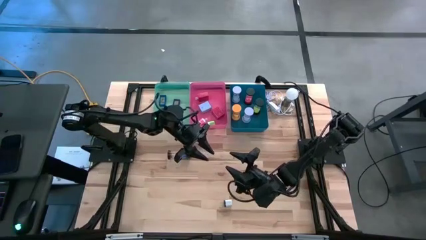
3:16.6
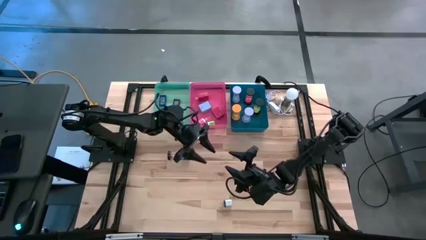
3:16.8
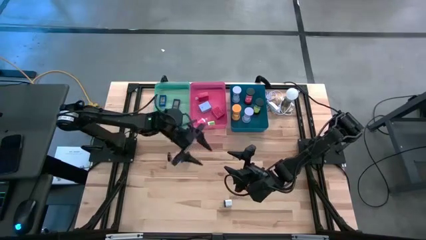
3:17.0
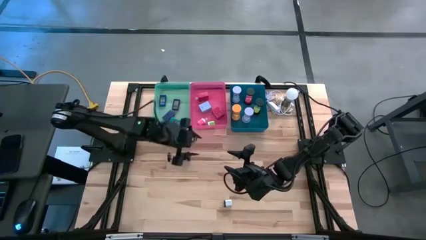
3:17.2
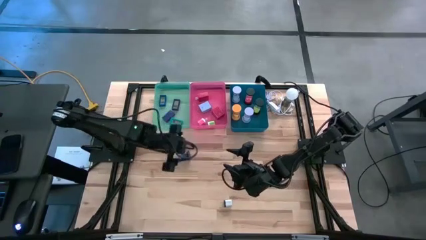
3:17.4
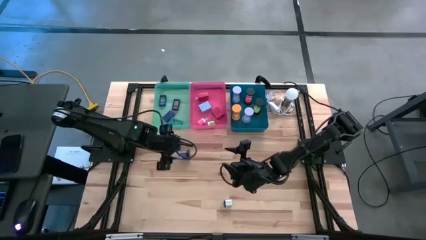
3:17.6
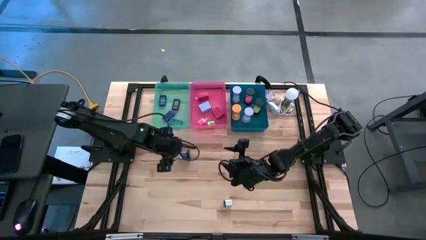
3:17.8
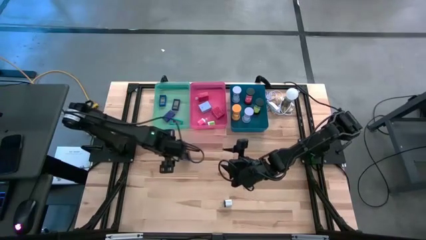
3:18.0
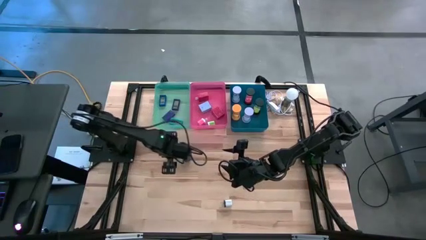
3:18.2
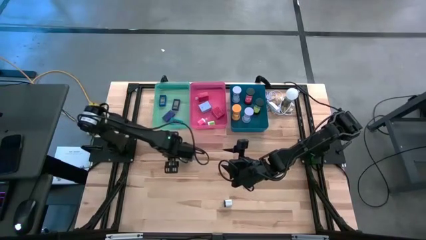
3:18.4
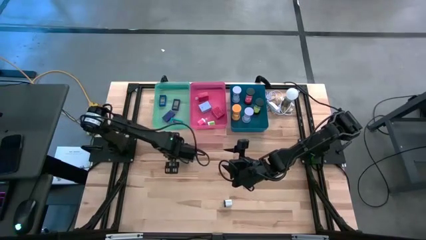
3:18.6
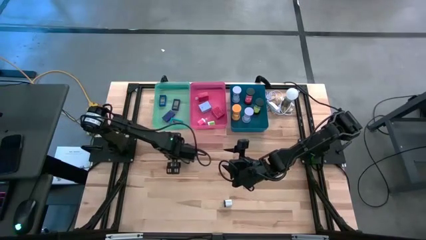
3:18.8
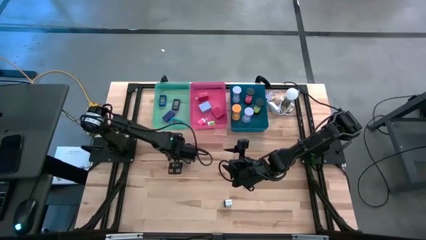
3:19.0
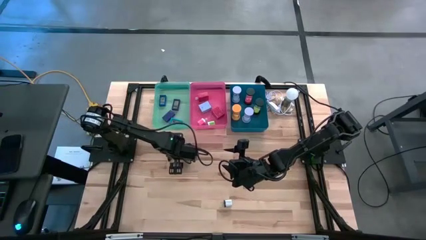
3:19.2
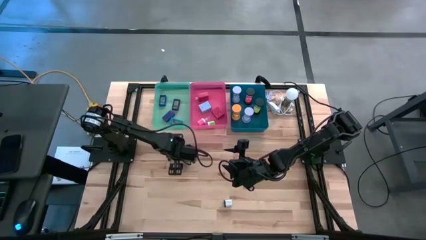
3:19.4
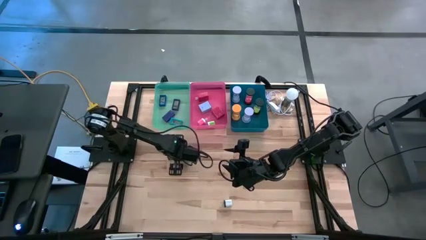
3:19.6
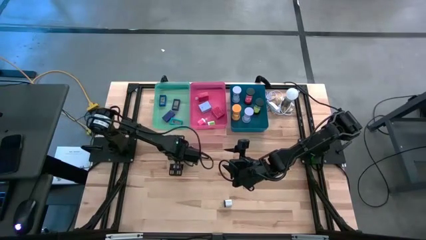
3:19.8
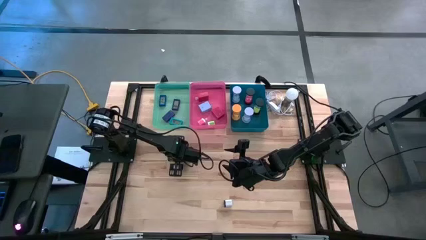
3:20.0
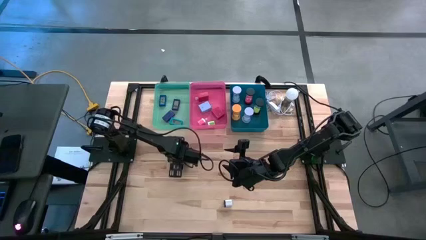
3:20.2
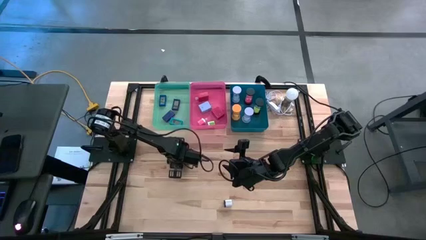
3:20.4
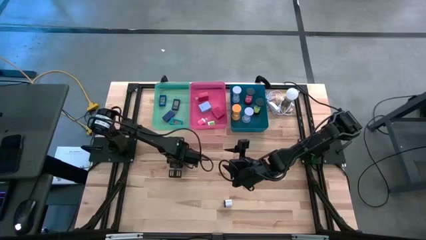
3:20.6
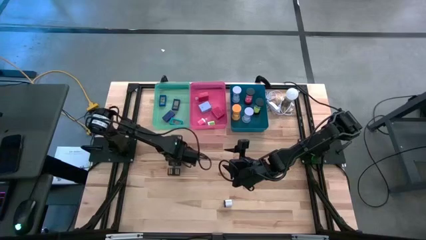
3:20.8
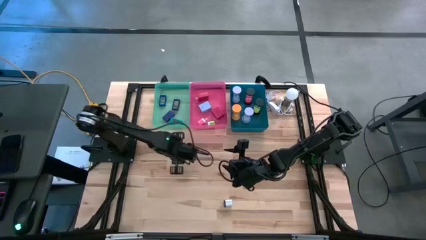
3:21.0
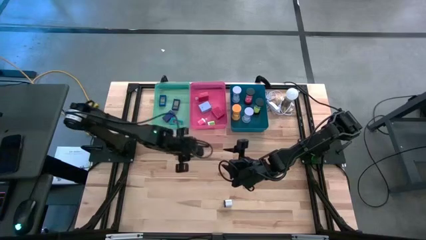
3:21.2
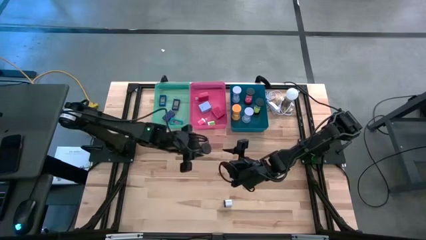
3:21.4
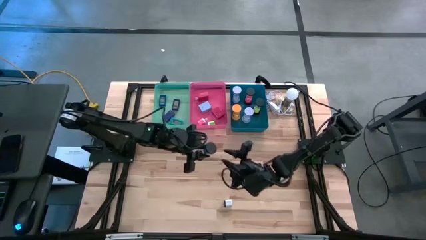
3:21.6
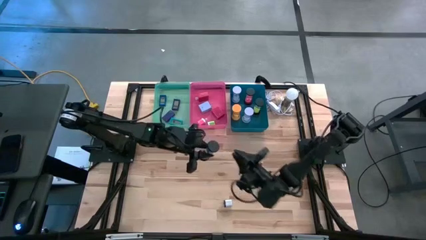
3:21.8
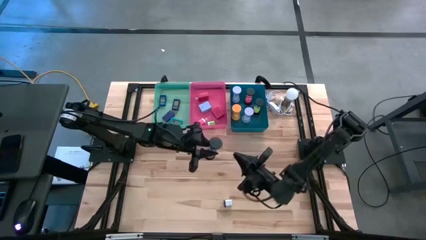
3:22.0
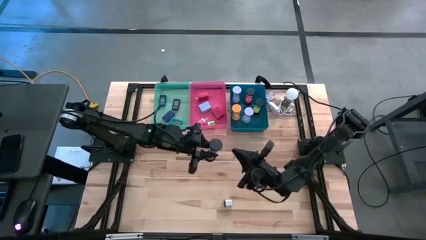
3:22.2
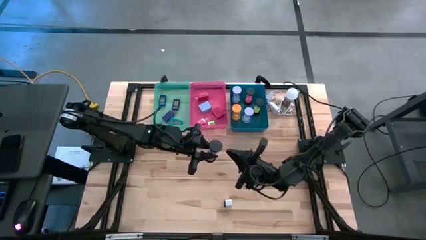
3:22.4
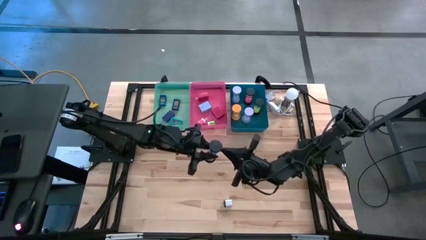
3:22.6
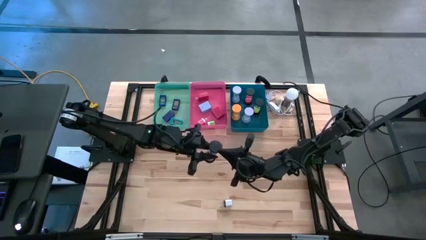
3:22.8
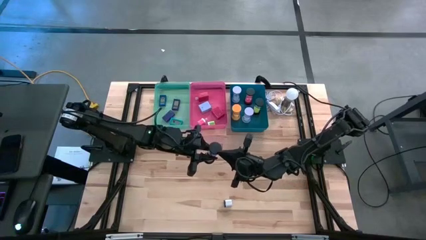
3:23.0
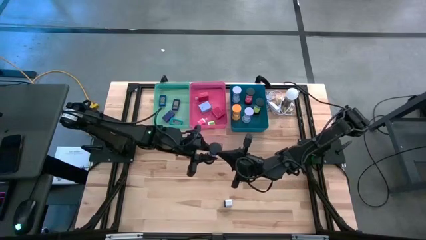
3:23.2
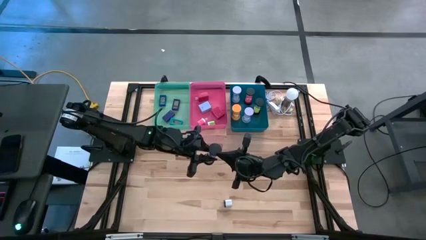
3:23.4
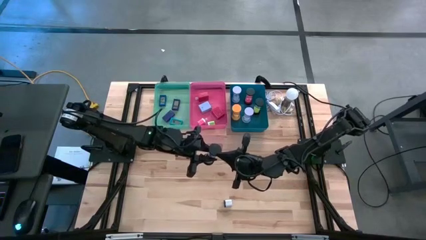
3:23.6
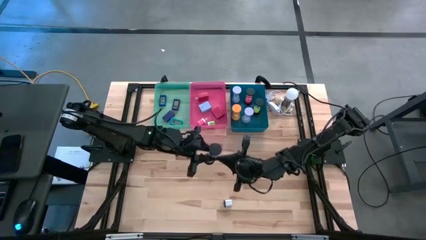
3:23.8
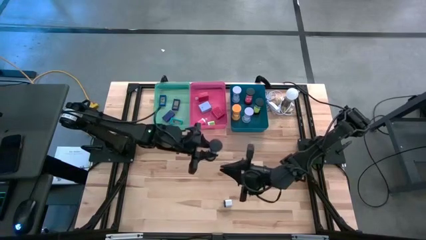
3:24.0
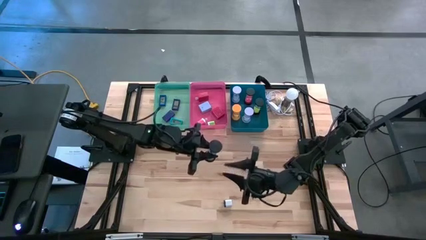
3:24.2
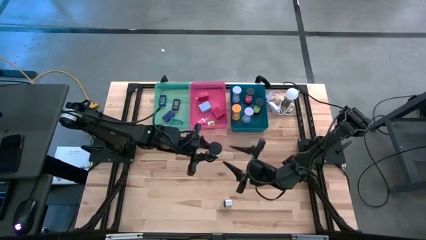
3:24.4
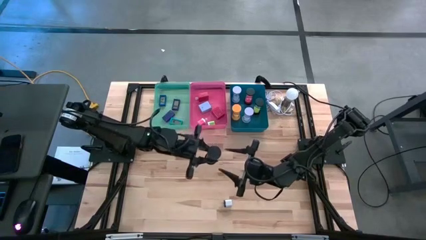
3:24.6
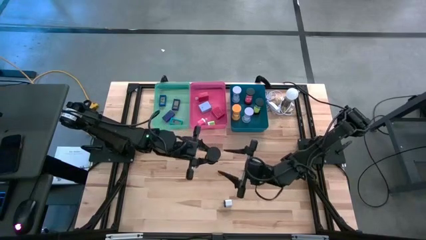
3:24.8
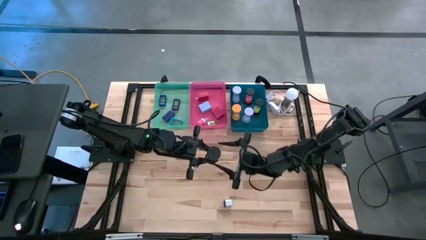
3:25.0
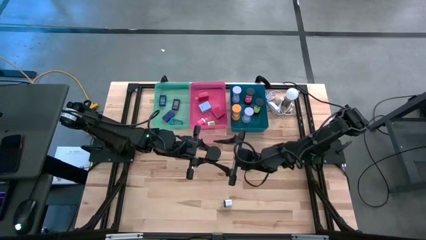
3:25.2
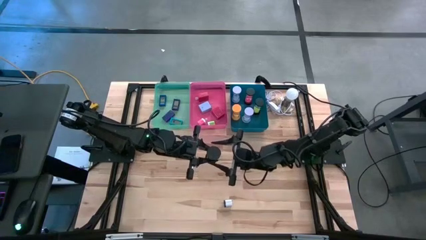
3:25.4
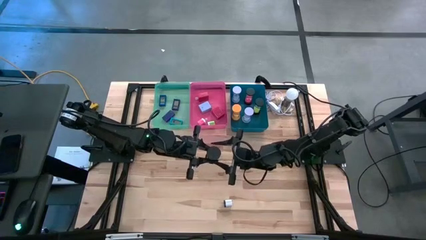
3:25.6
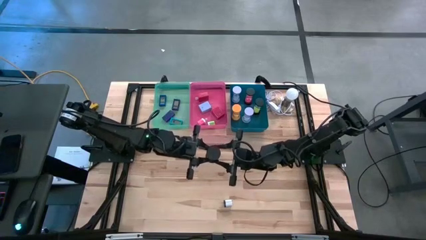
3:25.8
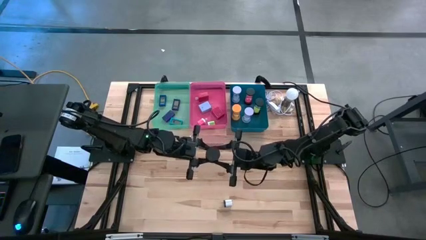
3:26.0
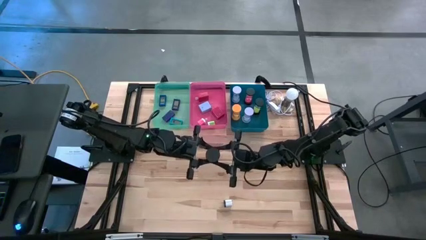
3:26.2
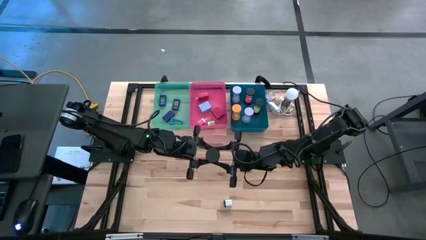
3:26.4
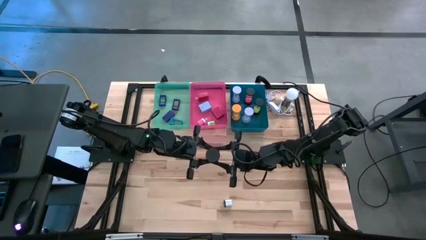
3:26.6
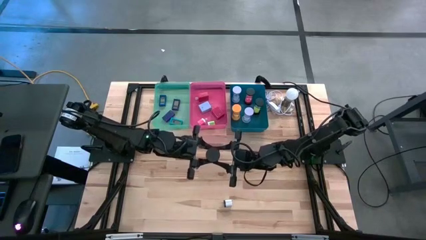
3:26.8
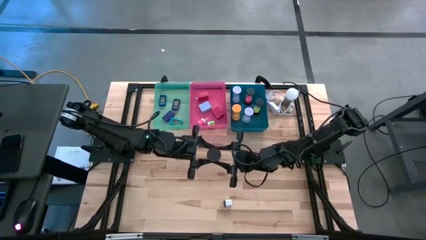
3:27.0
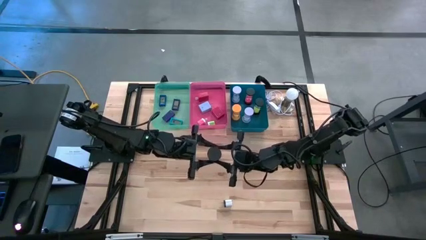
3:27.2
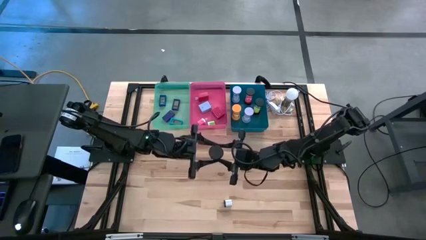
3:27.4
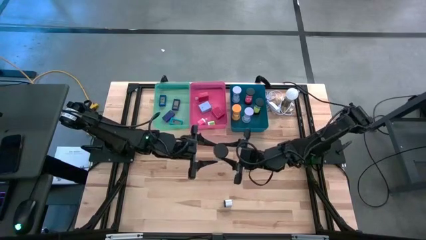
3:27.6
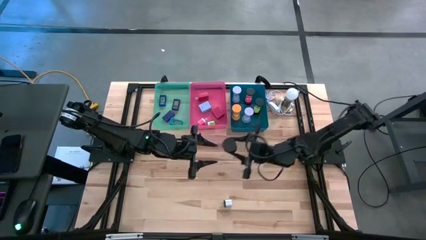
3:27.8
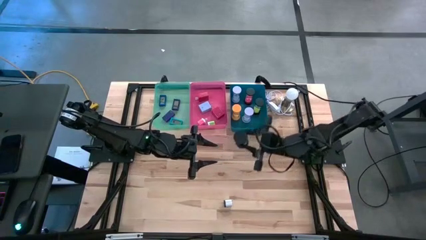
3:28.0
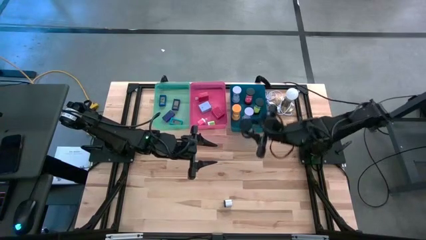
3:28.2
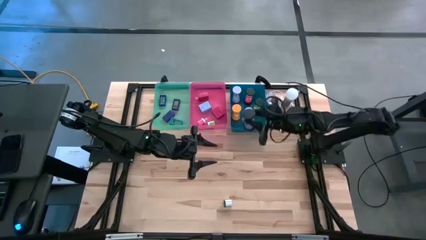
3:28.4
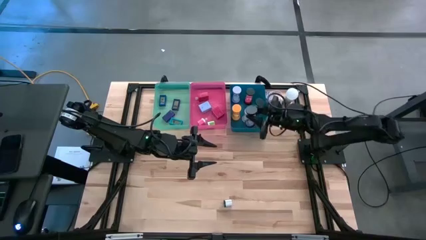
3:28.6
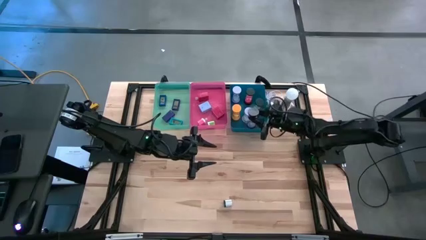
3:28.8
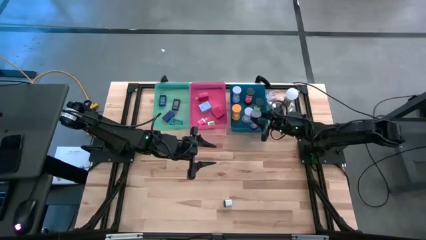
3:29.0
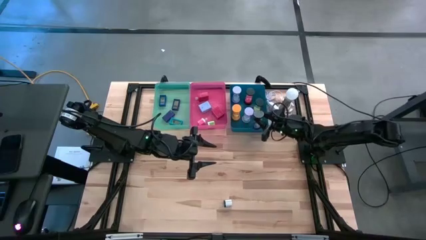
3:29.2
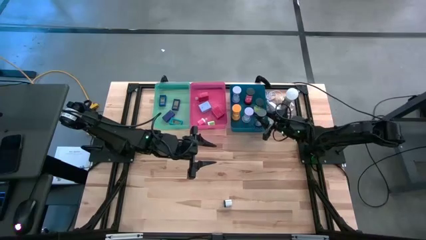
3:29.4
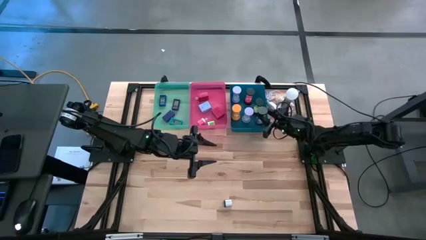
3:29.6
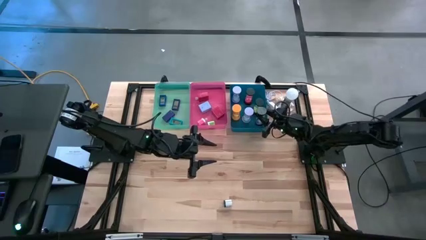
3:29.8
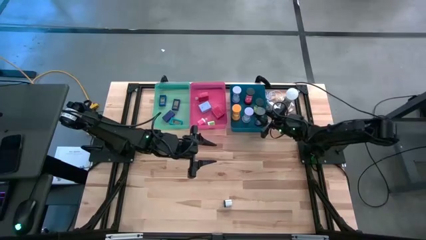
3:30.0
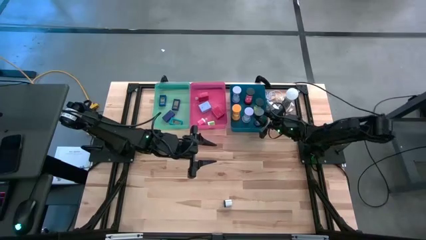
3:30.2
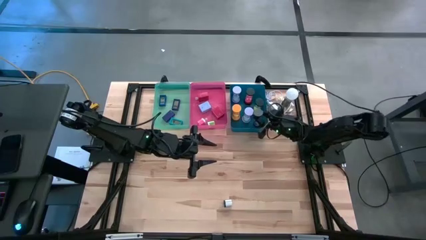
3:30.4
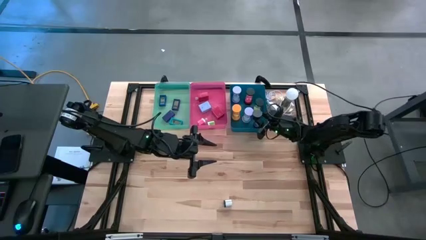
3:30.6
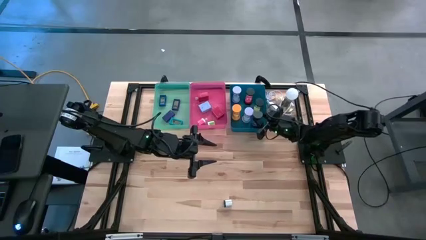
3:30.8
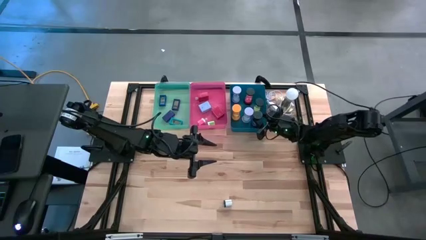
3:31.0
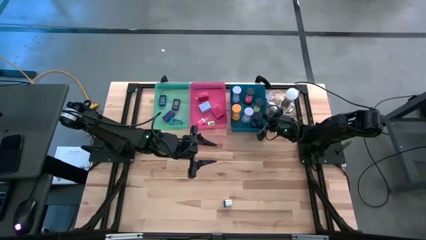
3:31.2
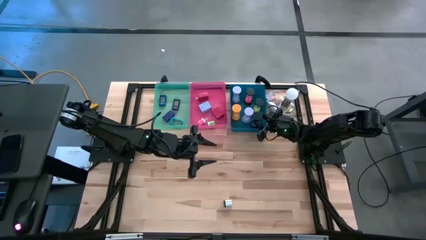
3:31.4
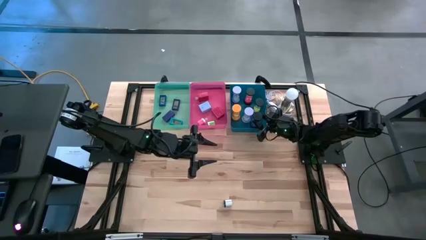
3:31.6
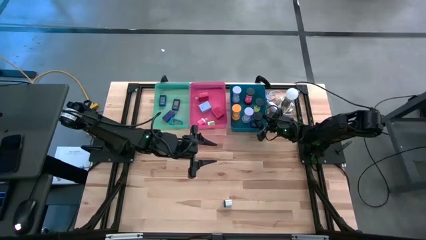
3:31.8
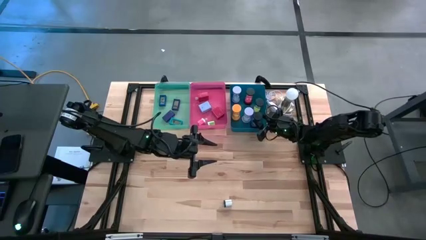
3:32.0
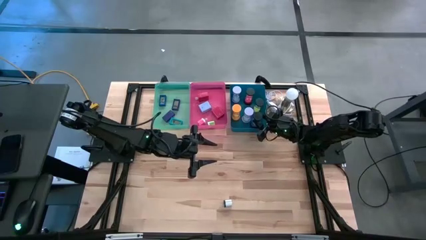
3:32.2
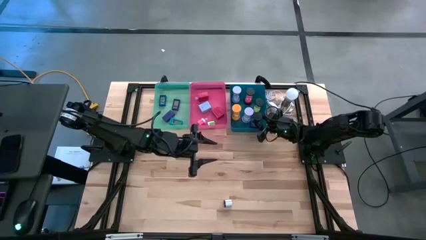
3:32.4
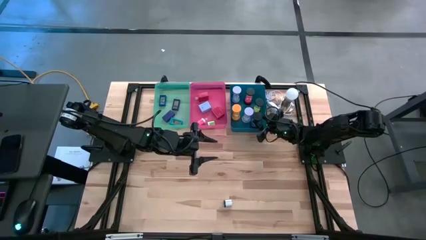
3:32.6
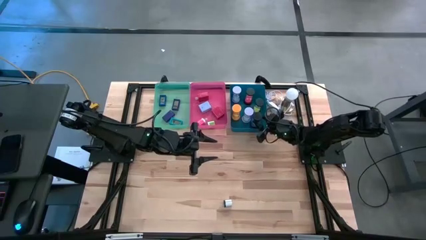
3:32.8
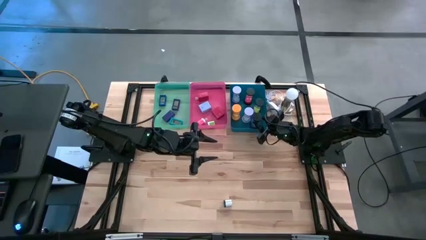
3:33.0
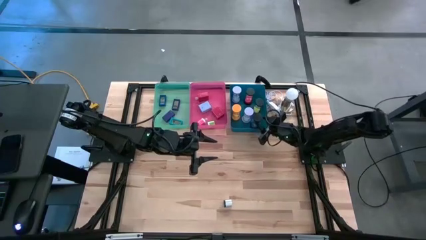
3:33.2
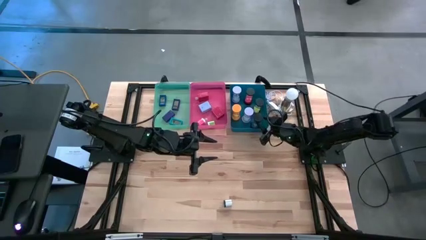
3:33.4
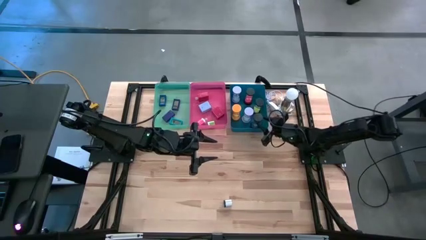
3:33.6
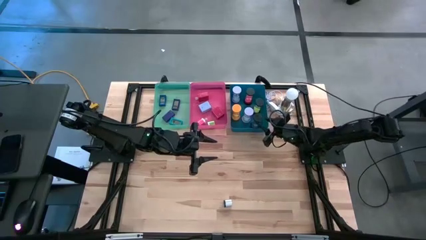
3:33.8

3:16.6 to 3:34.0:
Task: Pick & Place Office items
Put the blue hourglass into the dark blue bin

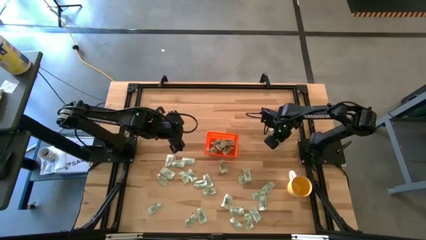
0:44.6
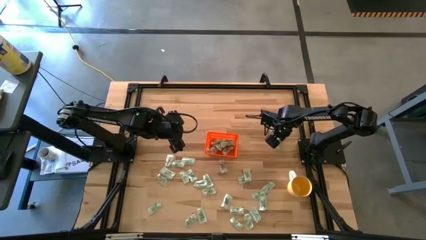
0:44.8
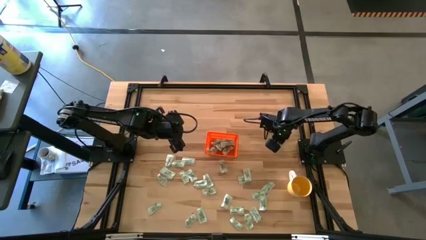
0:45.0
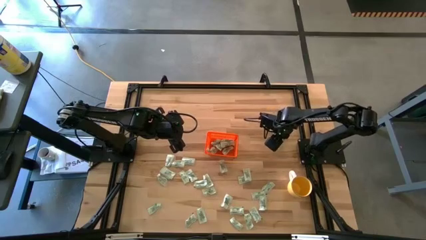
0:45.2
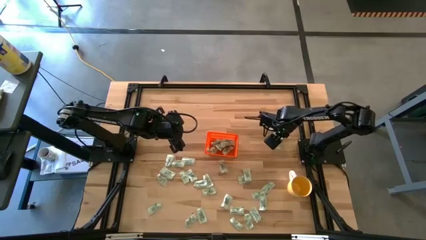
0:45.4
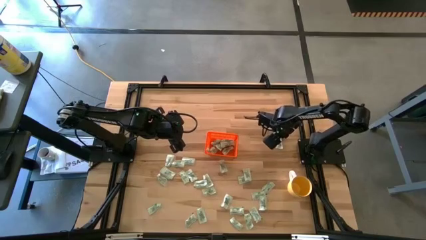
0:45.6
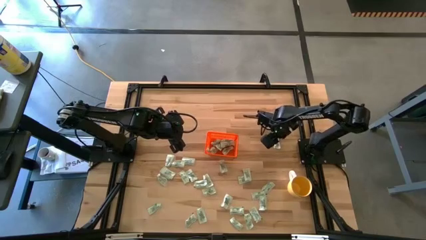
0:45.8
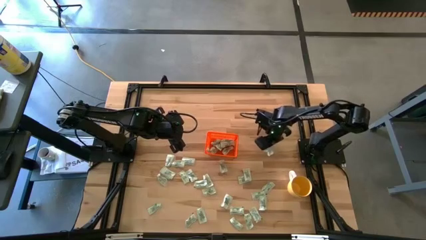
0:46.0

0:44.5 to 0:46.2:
Task: Pick and place Stevia / Truvia into bins
Adjust the light green stevia packets on the table
